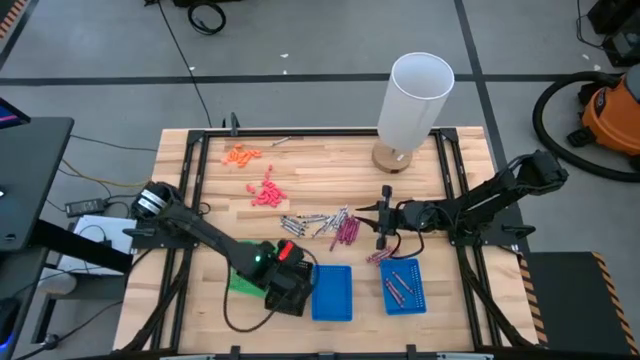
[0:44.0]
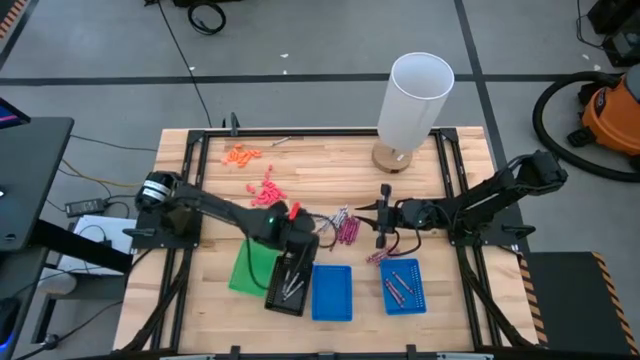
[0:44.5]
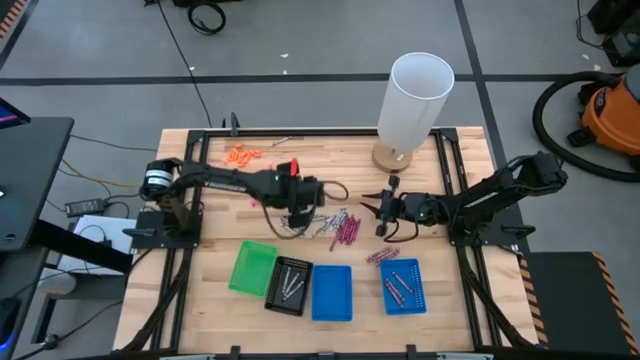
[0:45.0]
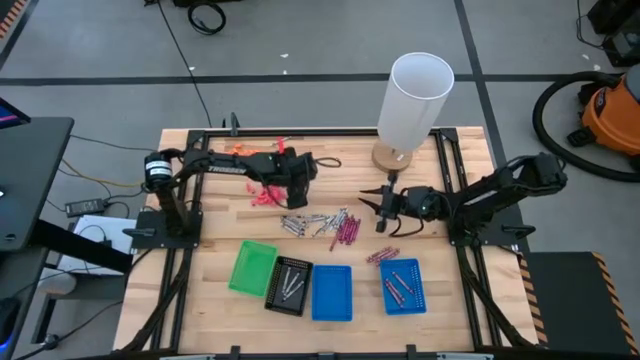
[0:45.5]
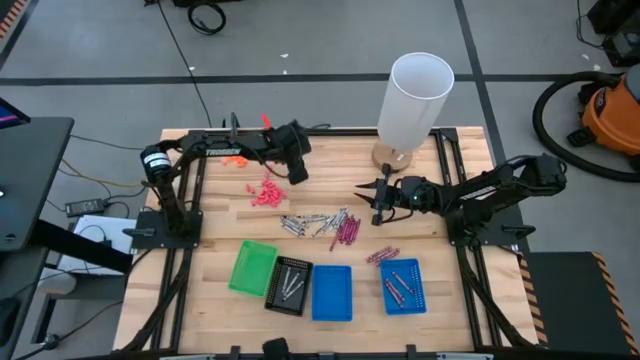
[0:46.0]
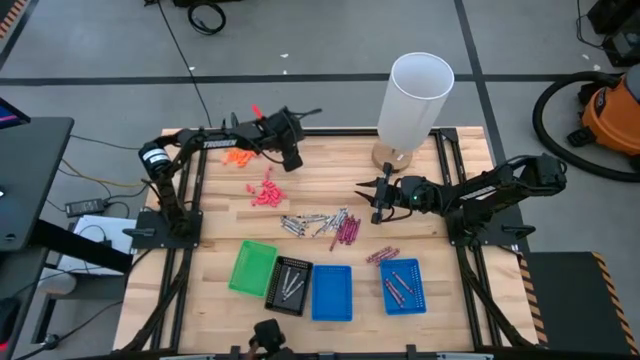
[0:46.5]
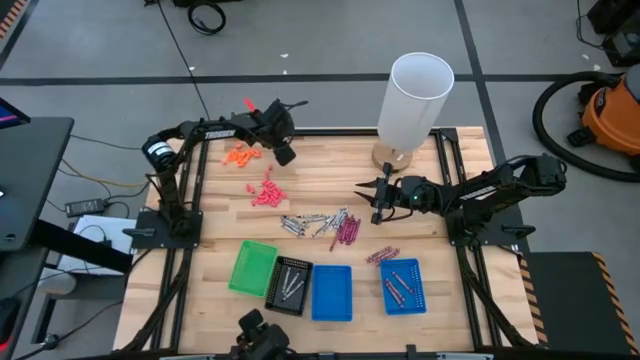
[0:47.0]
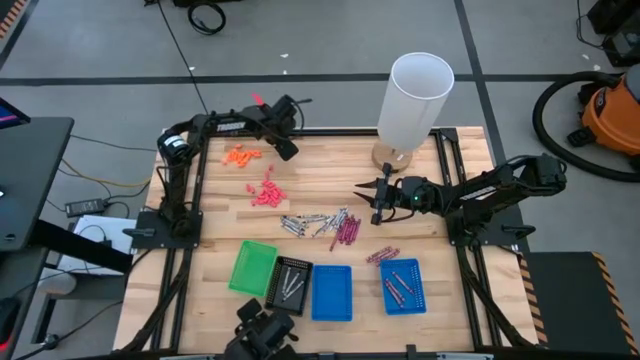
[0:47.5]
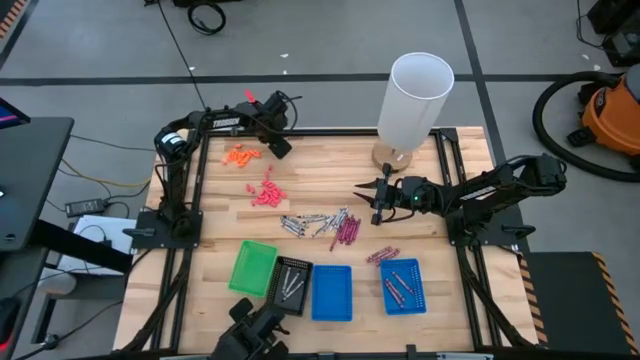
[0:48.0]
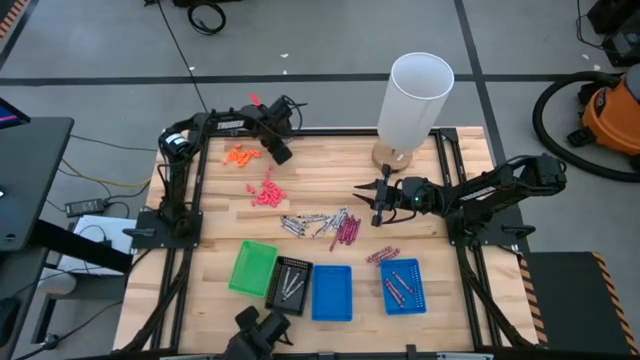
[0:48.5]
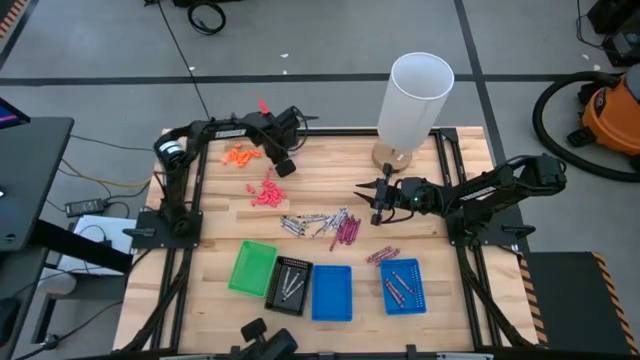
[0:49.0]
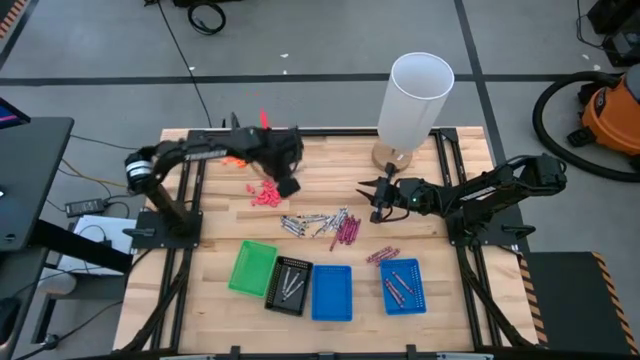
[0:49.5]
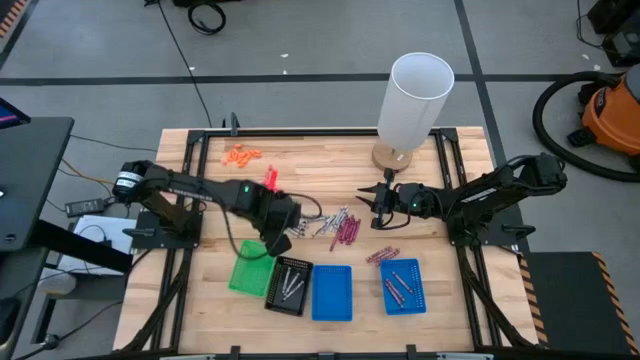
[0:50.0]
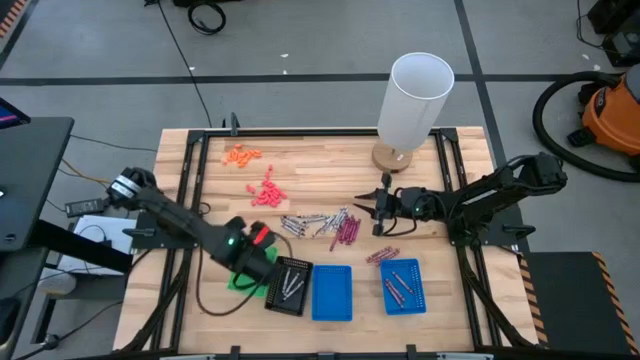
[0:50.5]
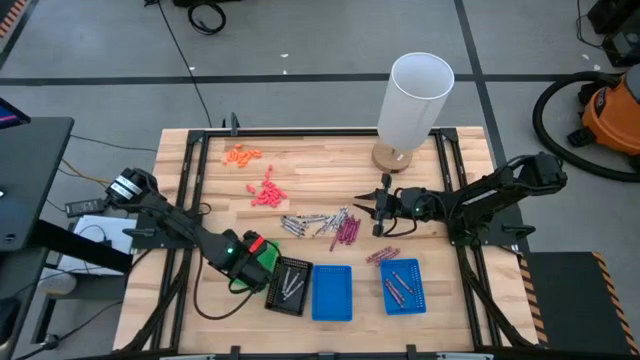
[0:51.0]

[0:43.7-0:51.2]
Task: Sort crayons
Put the white crayon into the green bin

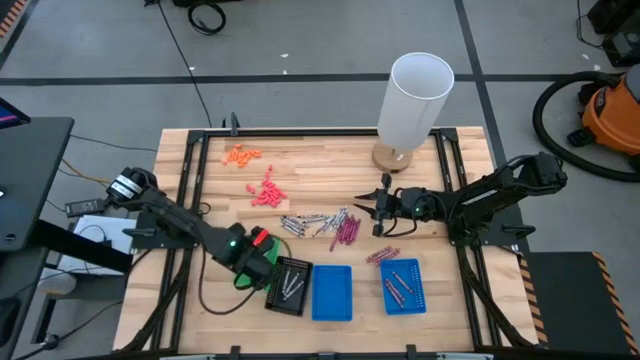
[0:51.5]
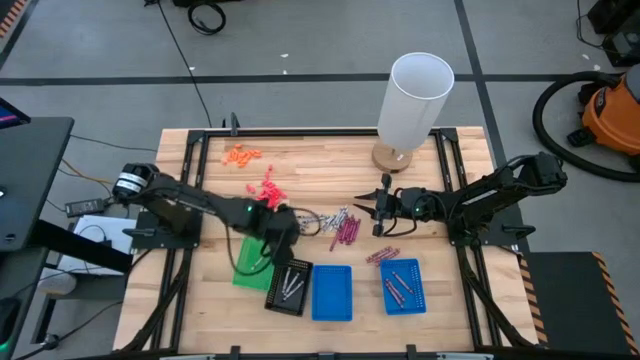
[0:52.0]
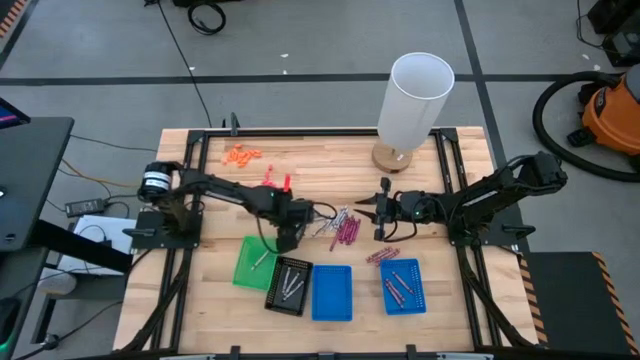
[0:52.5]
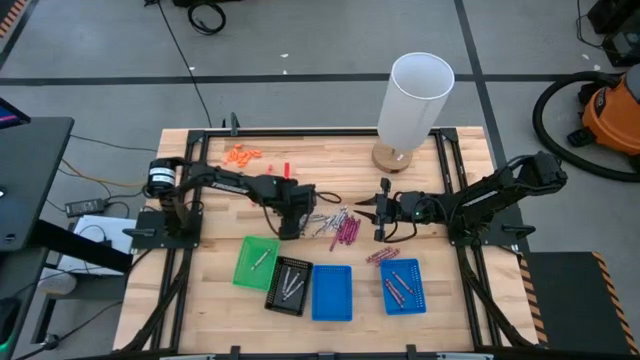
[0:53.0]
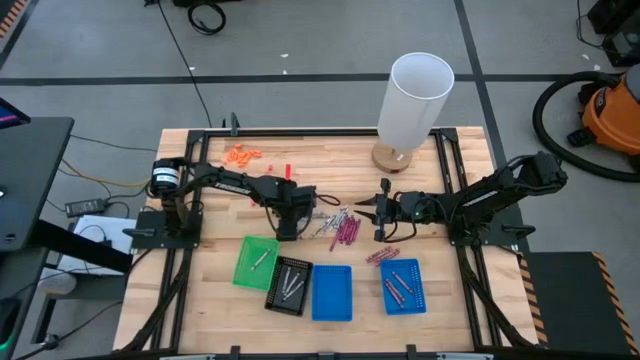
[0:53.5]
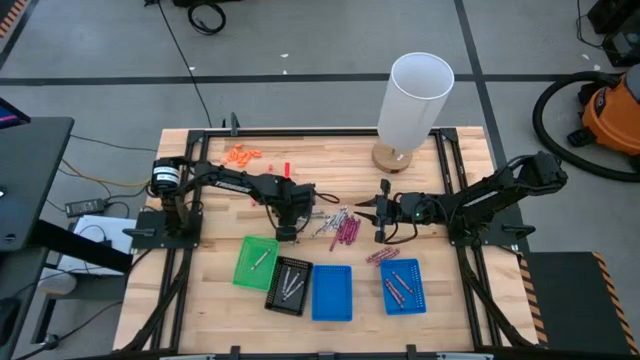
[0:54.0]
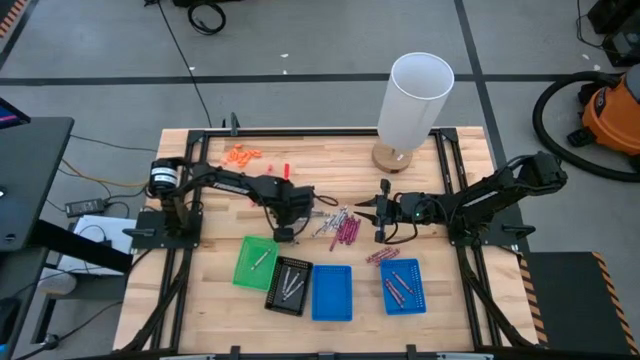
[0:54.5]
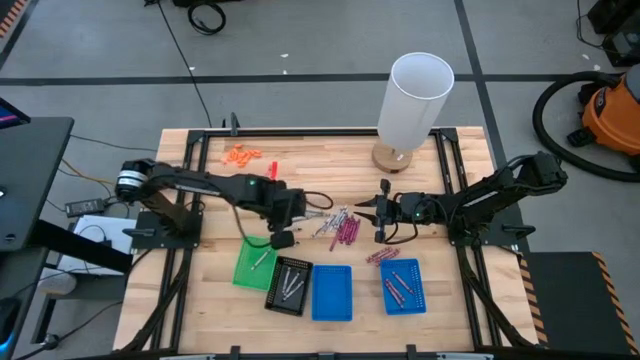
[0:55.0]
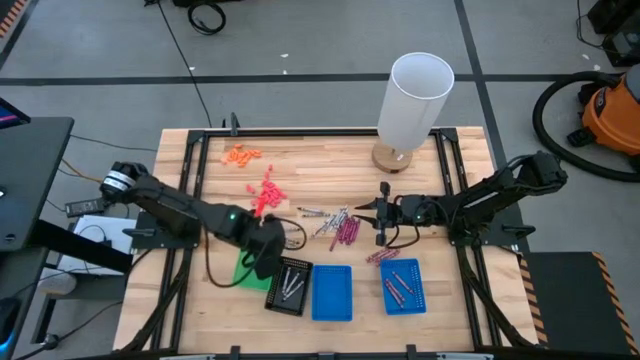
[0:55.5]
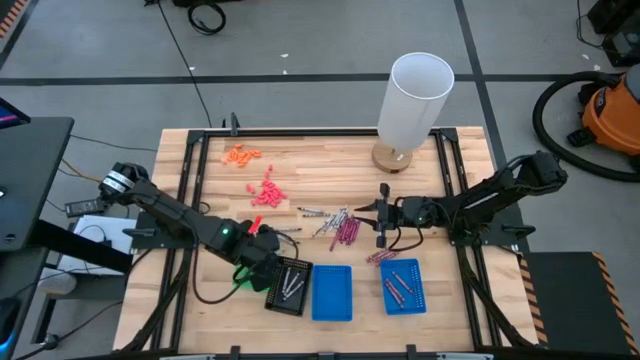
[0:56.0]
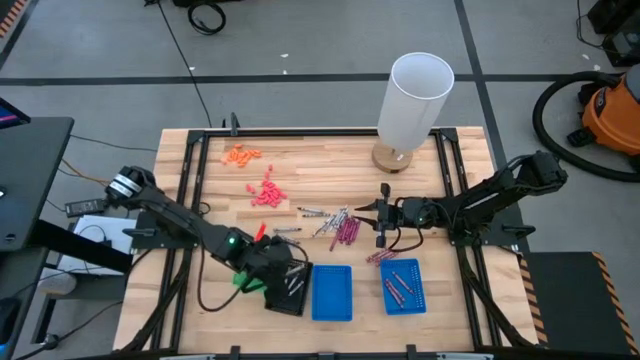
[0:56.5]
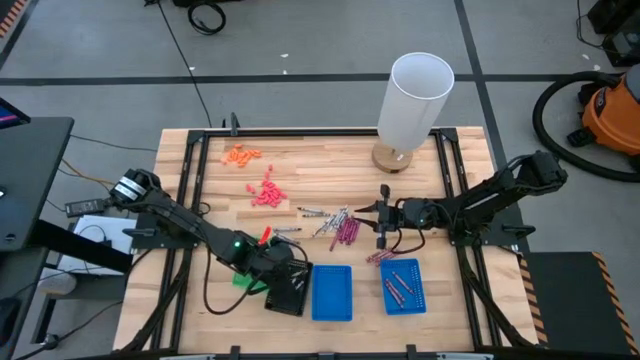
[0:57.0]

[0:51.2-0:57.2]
Put the black crayon into the black bin

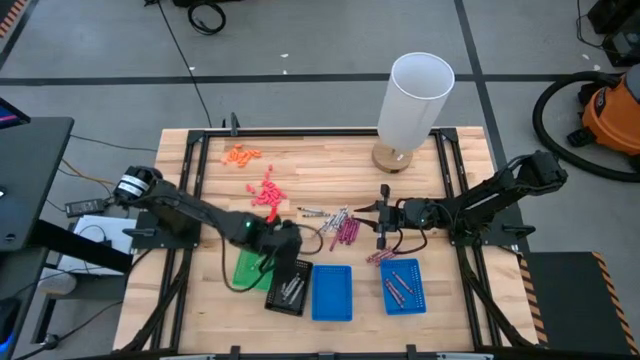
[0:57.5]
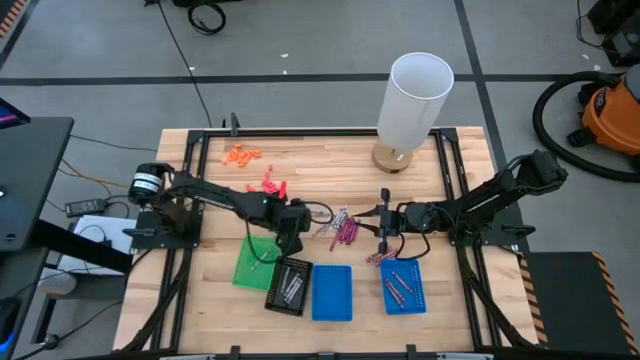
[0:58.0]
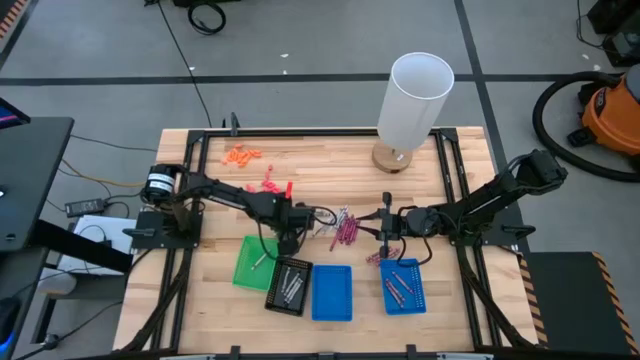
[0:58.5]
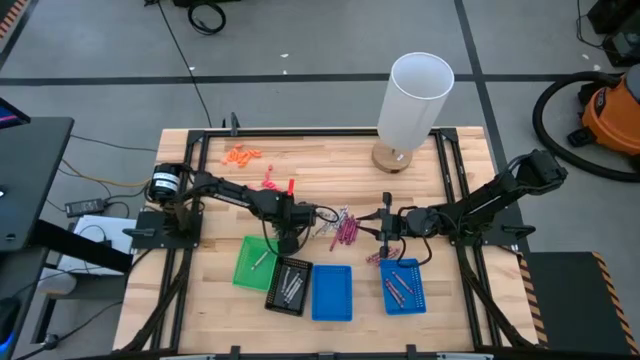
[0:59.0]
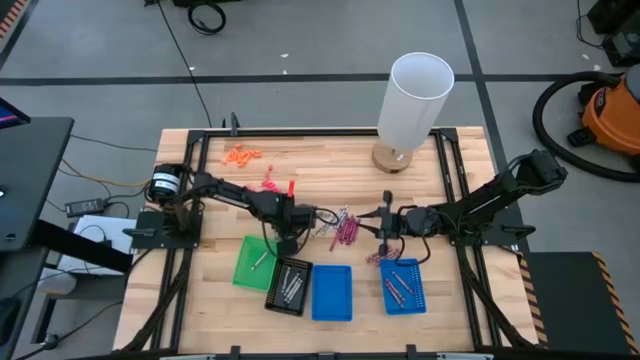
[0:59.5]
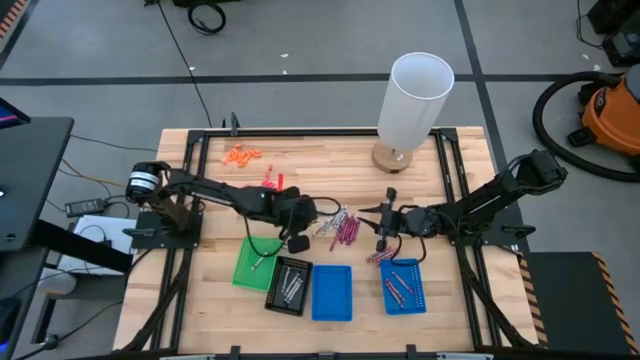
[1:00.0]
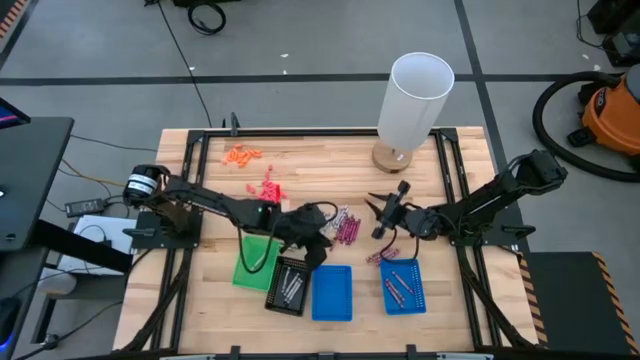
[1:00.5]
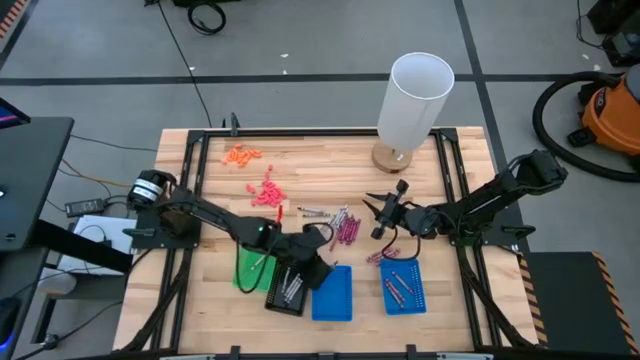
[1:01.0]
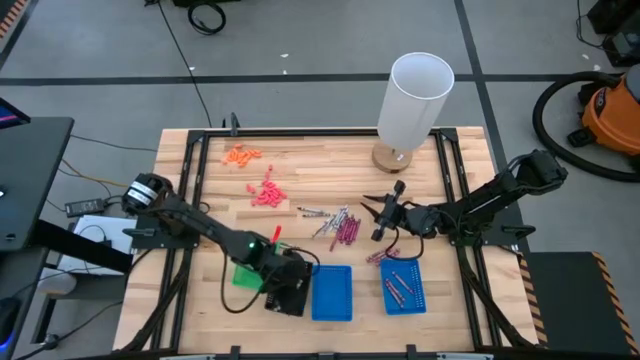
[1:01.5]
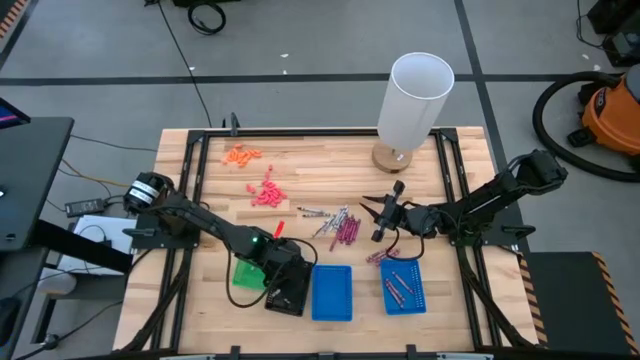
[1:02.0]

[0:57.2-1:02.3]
Put the black crayon into the black bin

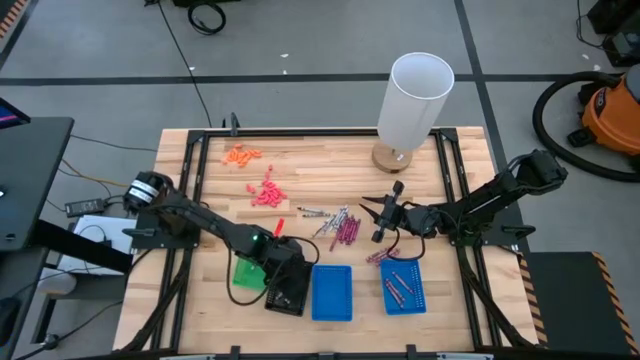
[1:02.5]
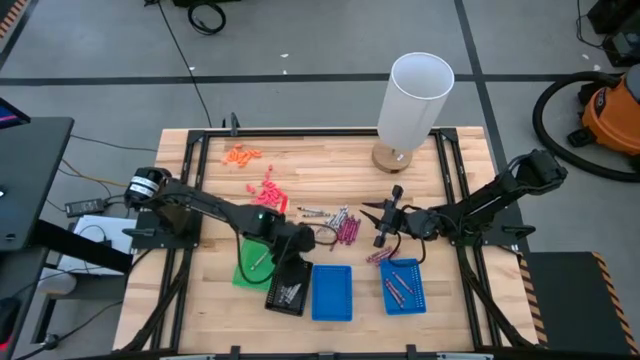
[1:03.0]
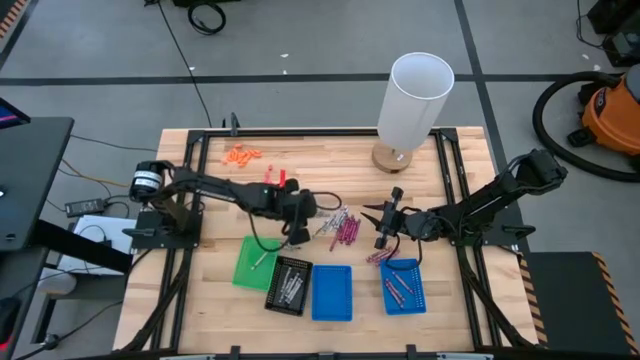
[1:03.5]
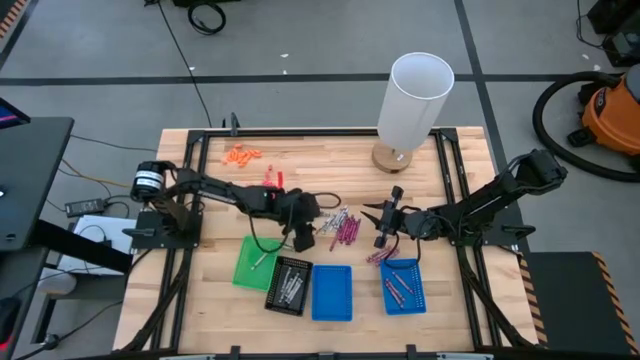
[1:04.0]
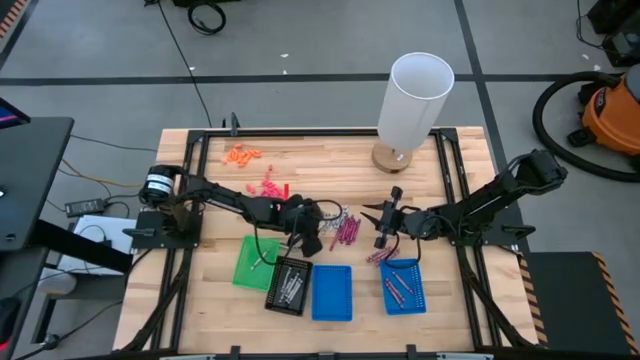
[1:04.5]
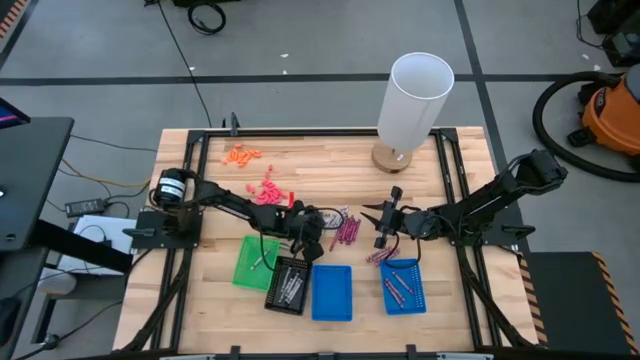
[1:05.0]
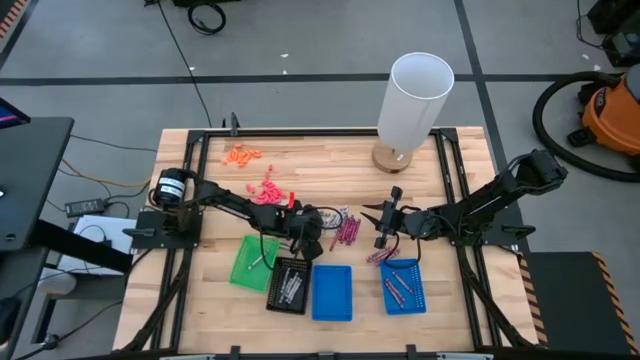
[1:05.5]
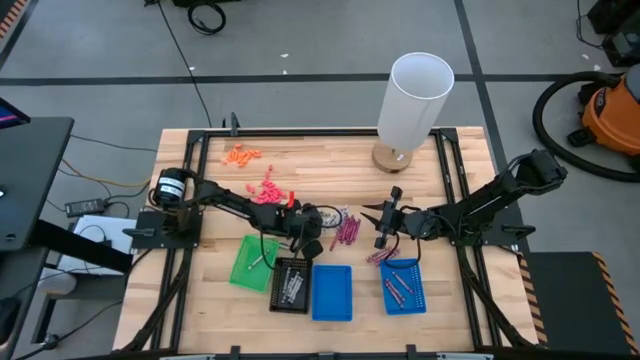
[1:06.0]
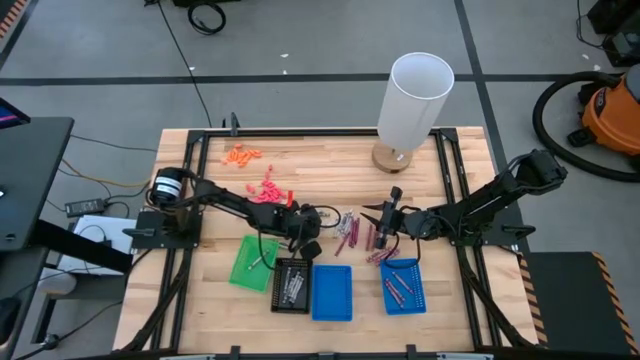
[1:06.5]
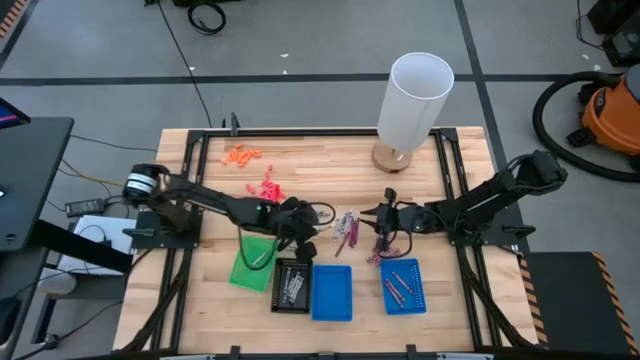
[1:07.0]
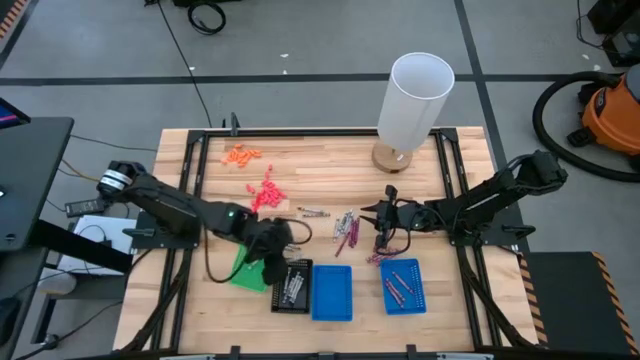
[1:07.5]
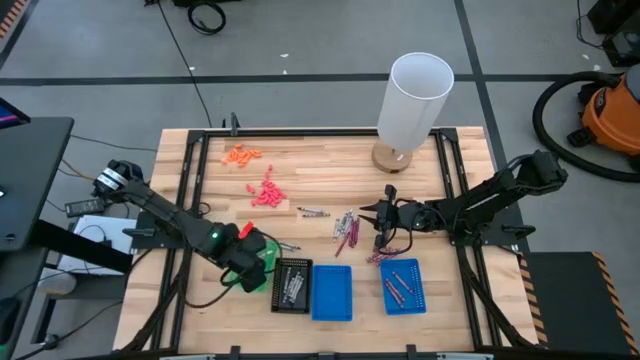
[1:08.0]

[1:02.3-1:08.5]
Put the white crayon into the green bin
